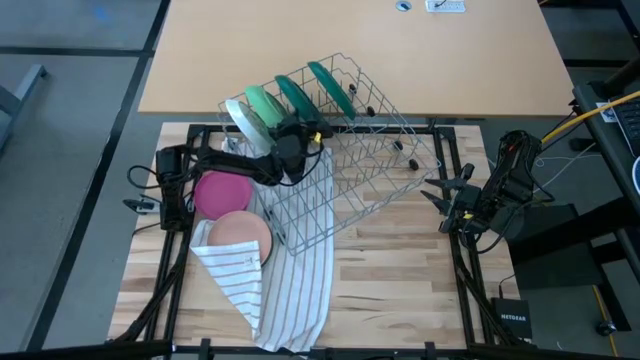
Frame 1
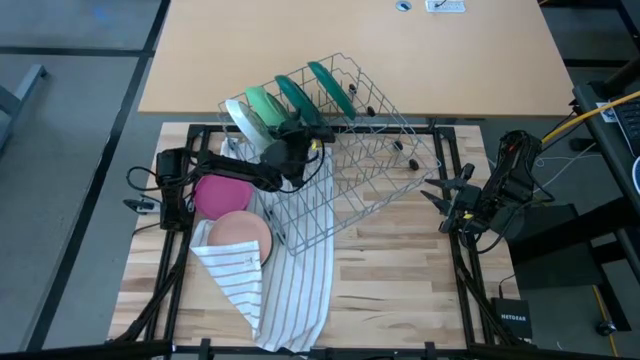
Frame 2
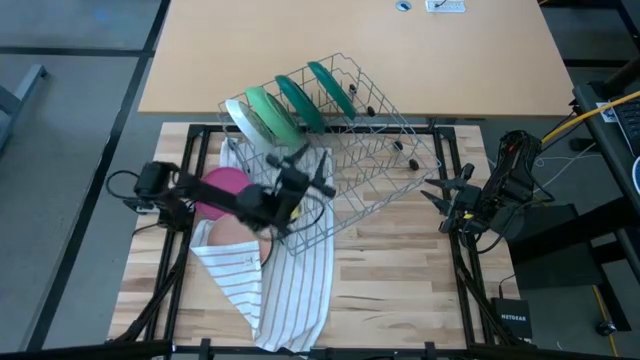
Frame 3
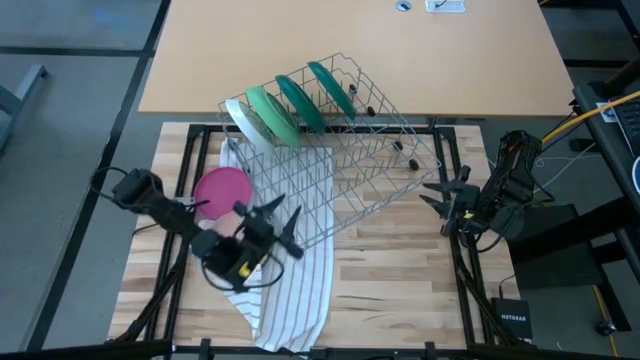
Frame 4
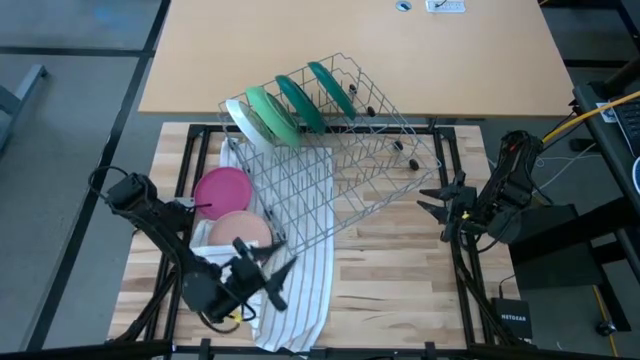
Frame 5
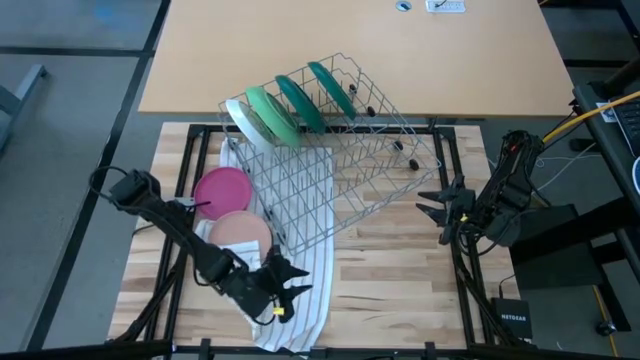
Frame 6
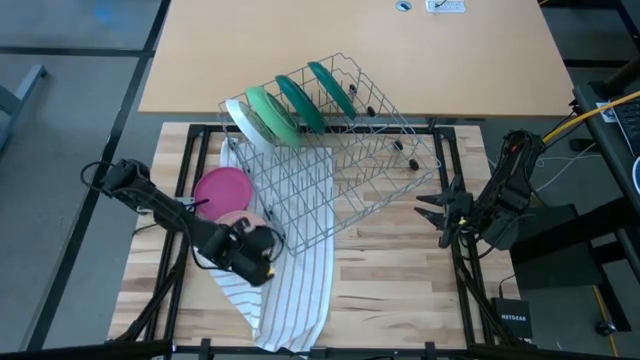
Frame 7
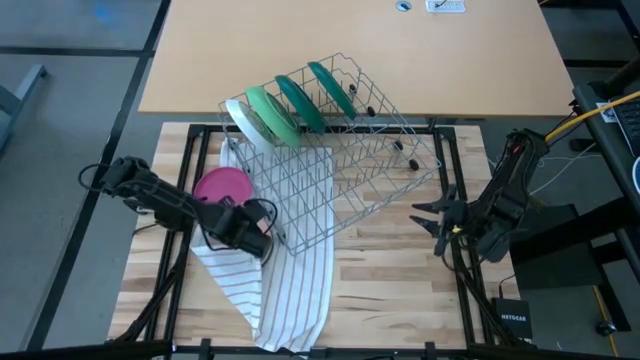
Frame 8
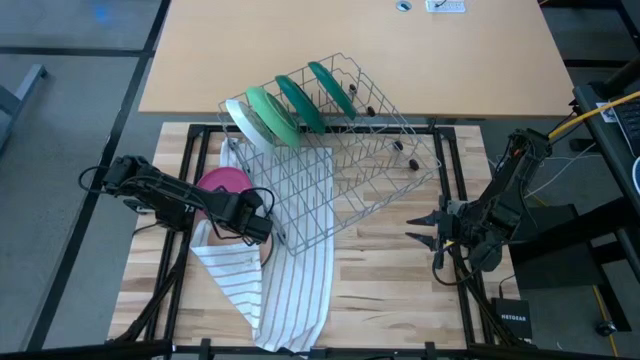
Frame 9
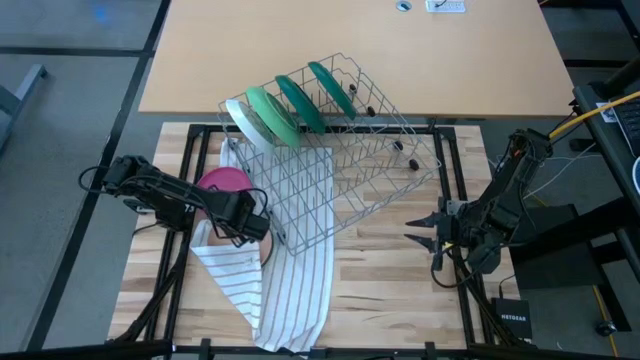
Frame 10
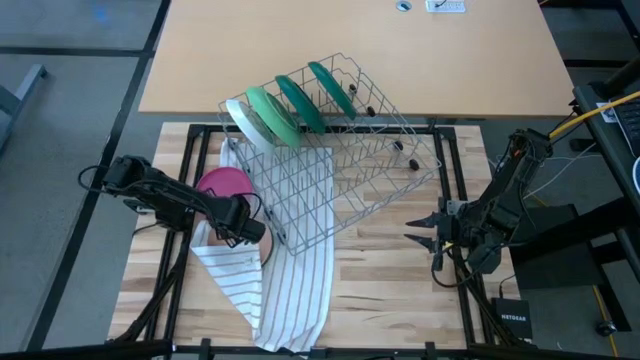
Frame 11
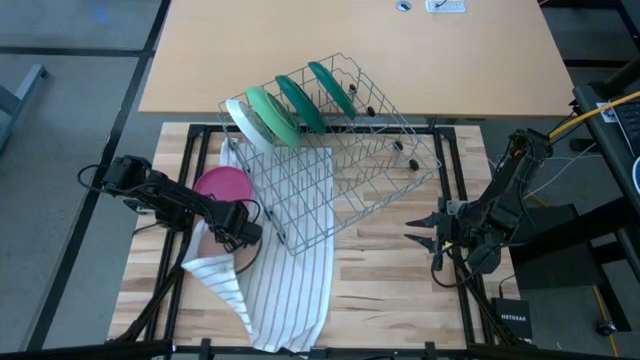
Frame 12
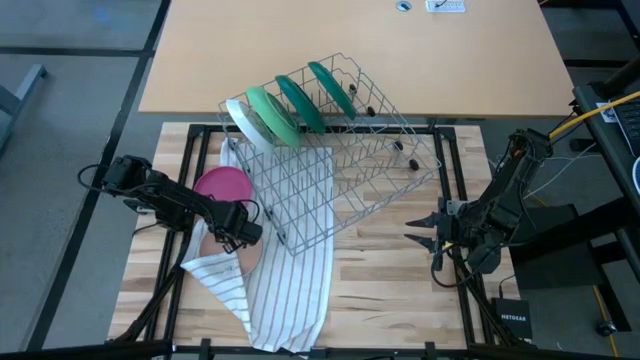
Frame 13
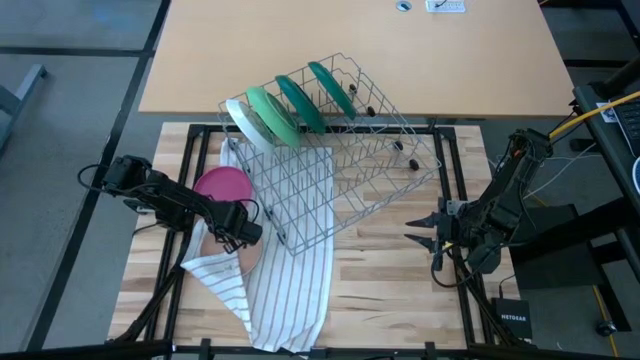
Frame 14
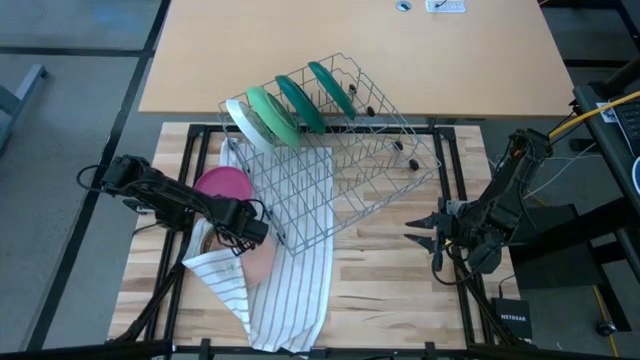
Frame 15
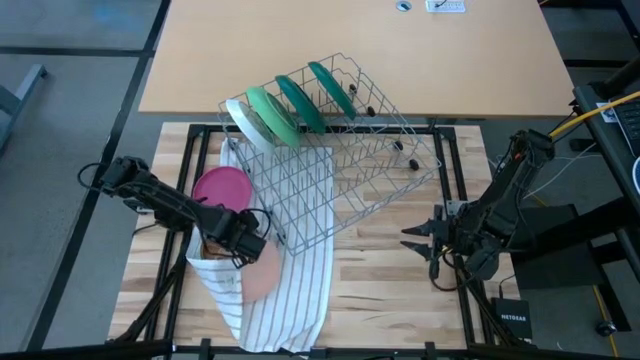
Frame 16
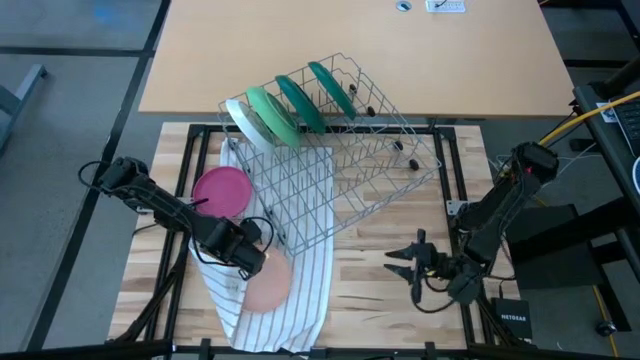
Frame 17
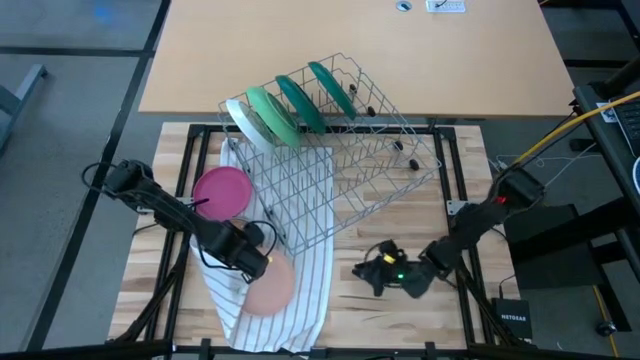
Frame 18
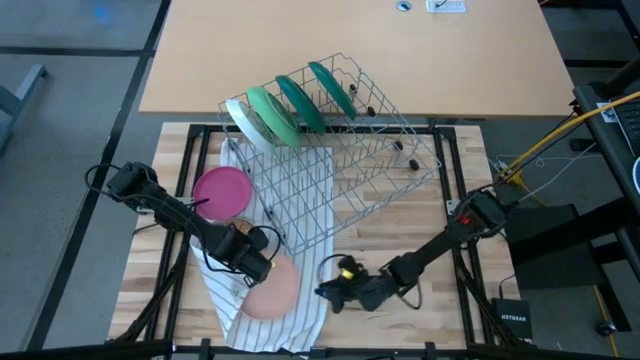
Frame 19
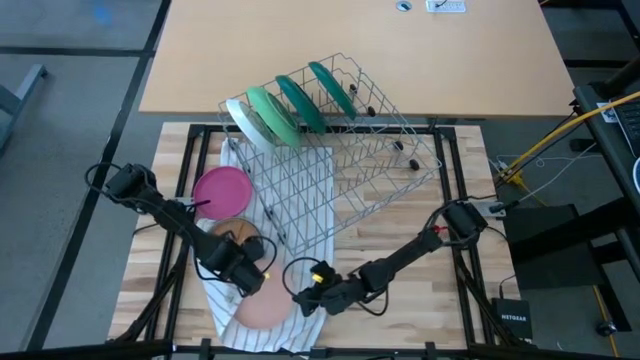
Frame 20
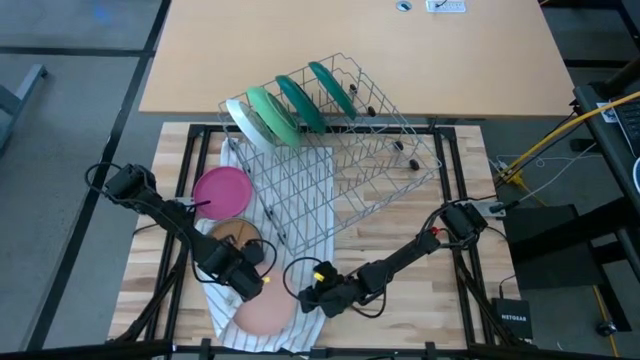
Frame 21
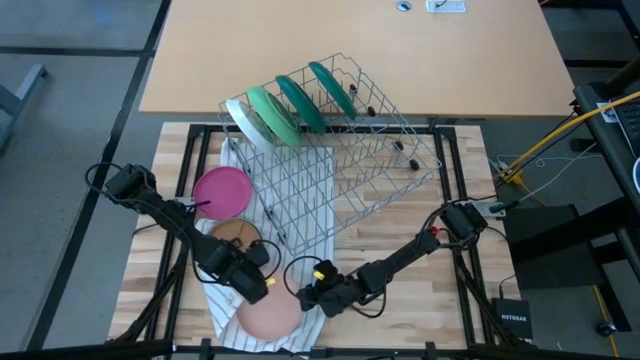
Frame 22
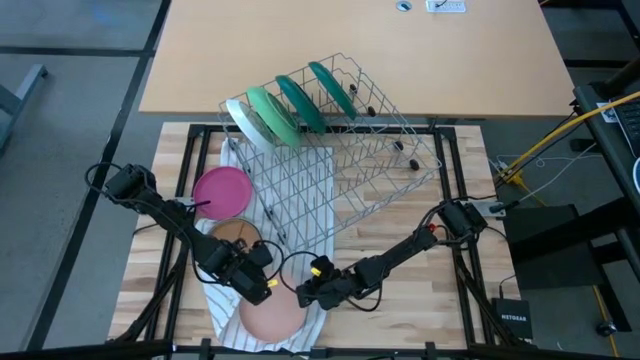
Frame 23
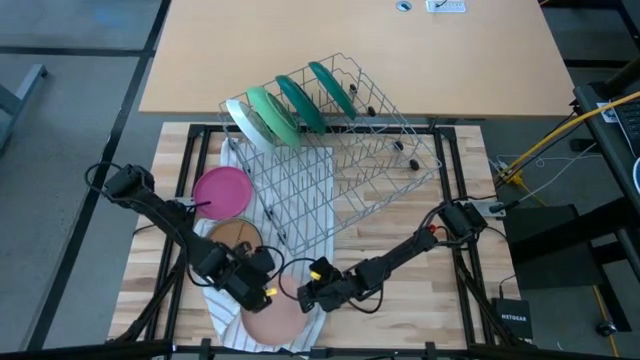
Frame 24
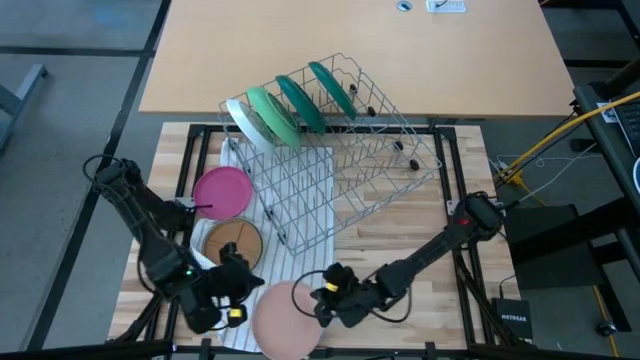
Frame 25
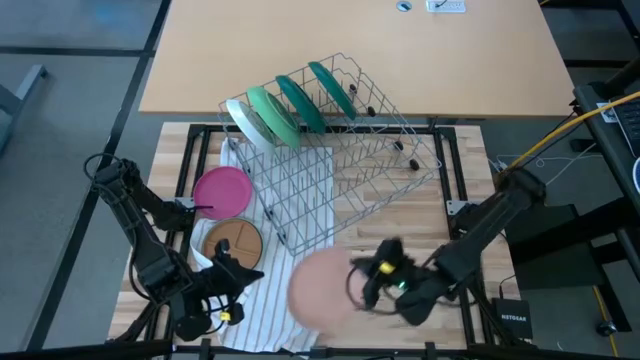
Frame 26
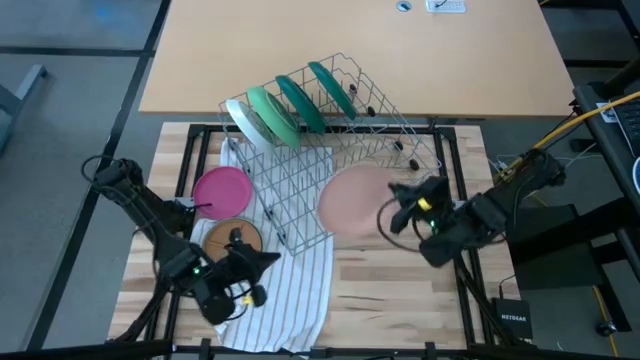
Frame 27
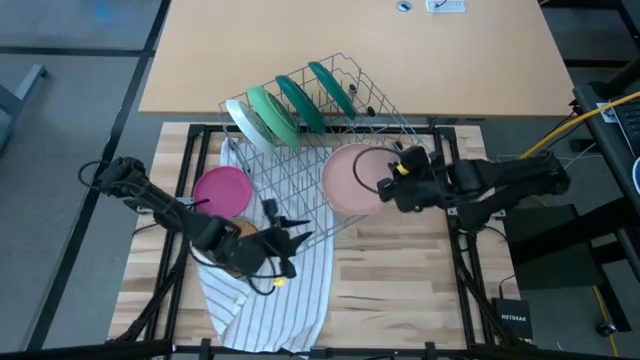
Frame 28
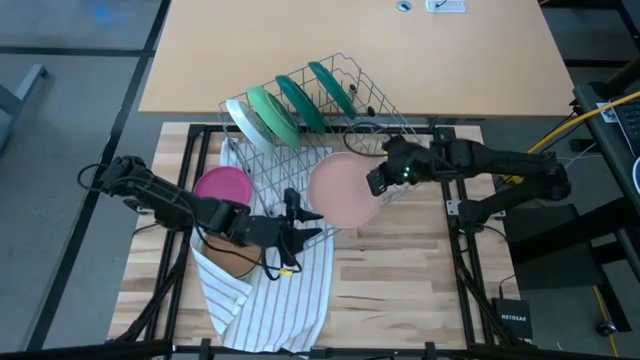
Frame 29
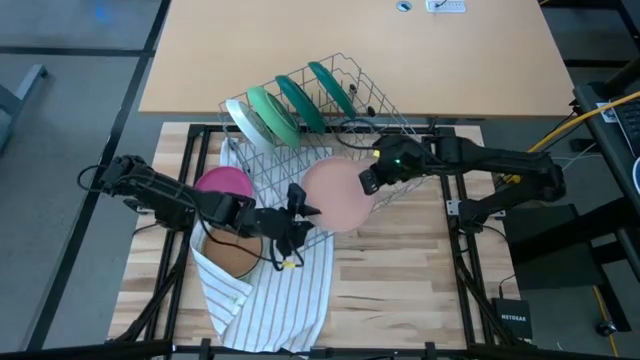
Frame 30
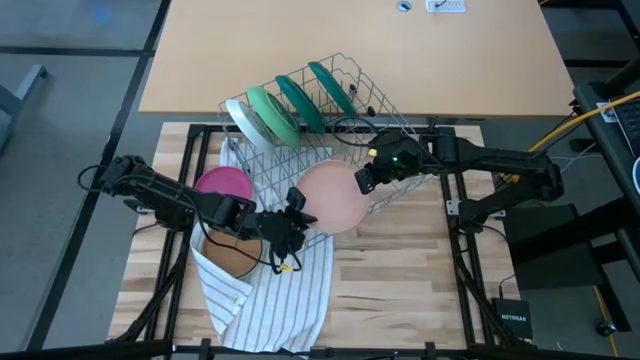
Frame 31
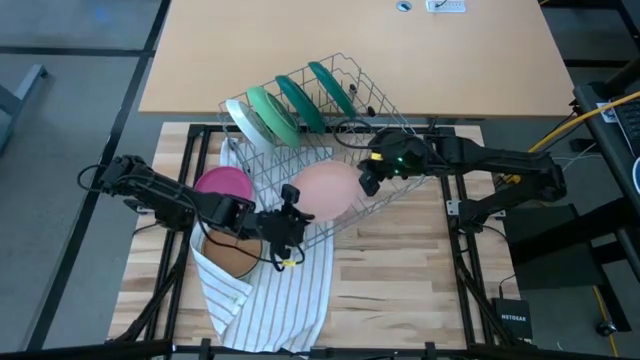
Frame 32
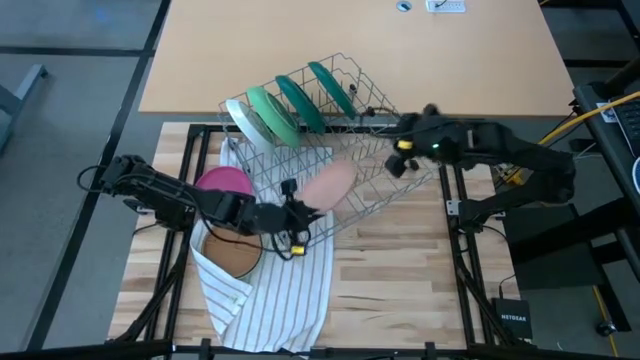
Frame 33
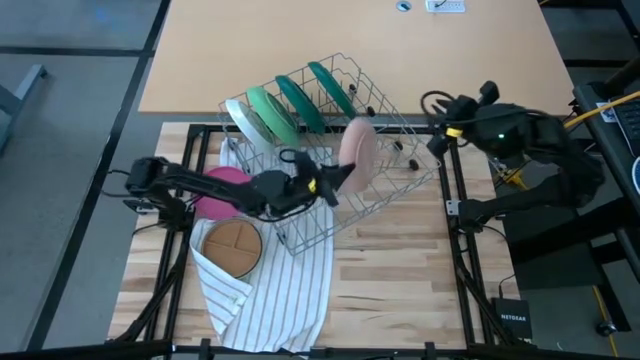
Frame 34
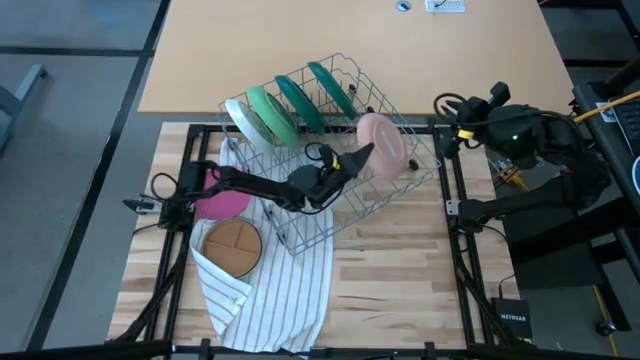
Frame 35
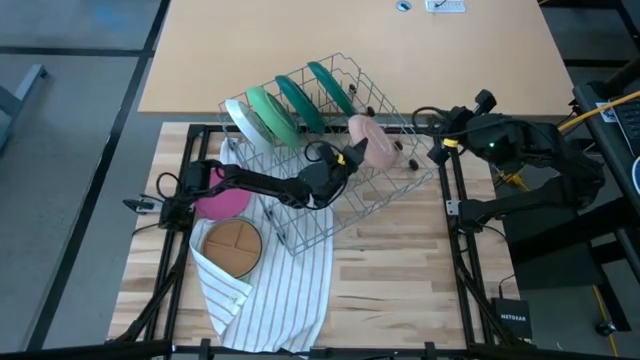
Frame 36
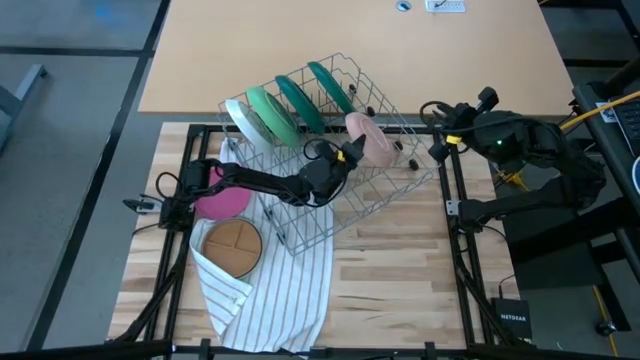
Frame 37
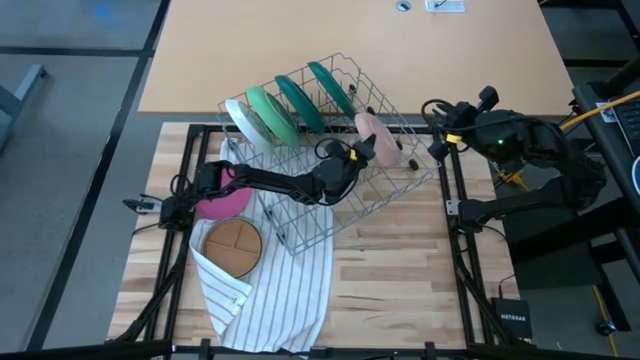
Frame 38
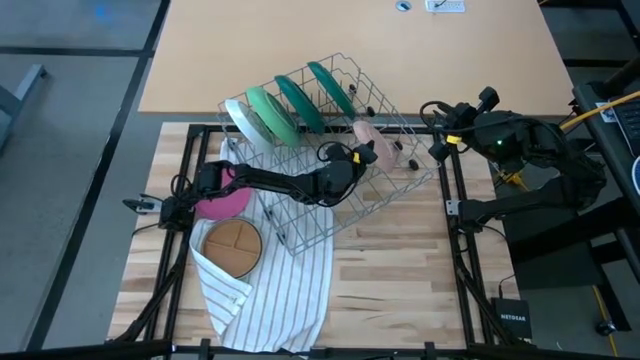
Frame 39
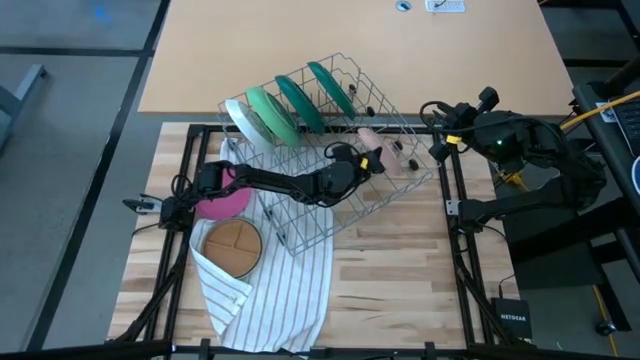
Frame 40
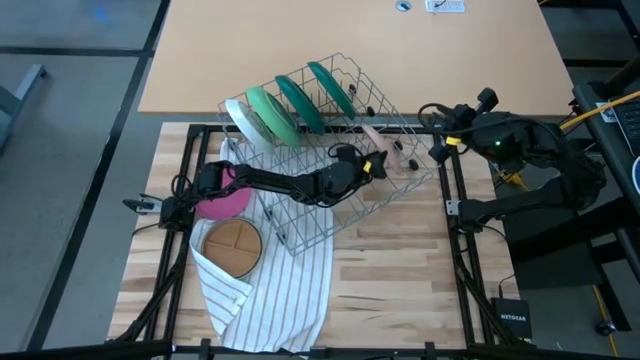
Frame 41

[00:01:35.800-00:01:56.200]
Task: Sort dishes
Put the light orange plate in the dish rack
